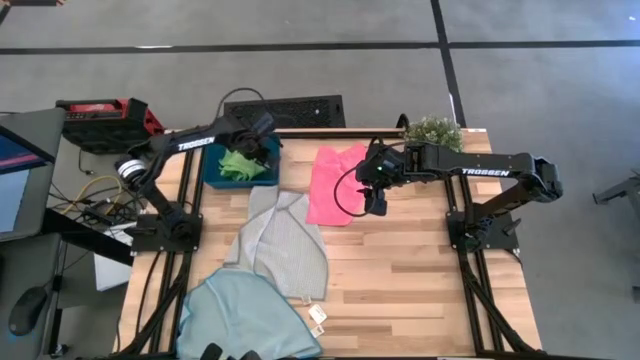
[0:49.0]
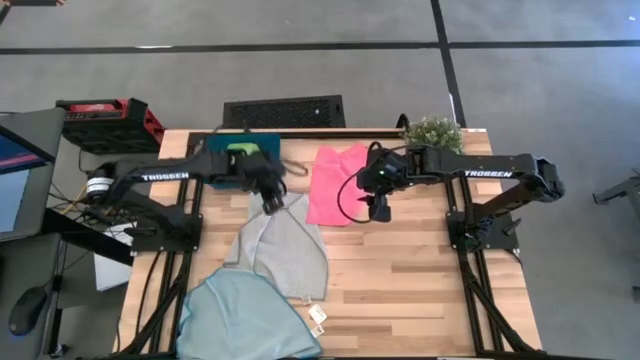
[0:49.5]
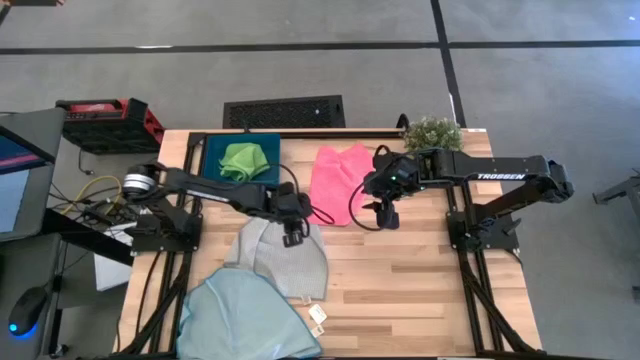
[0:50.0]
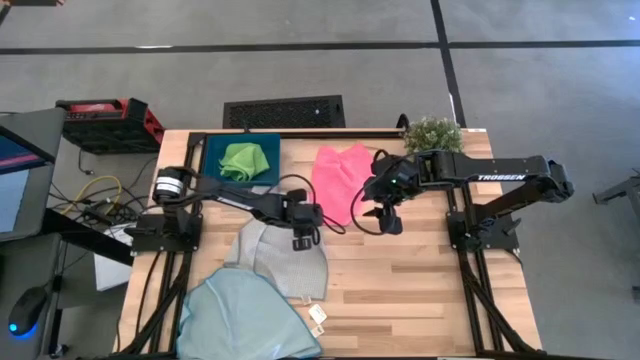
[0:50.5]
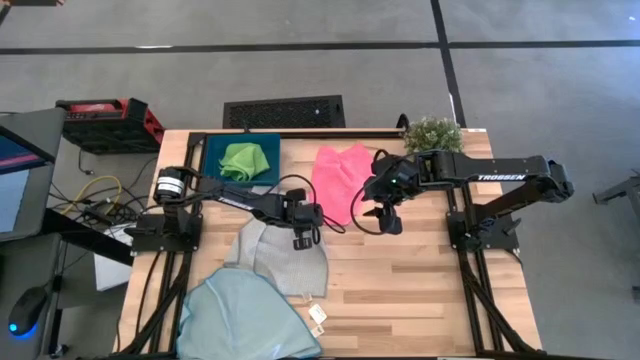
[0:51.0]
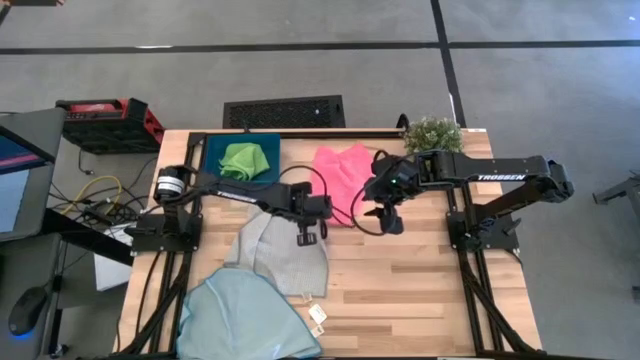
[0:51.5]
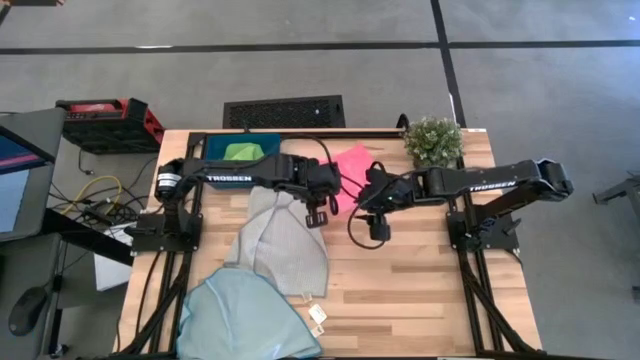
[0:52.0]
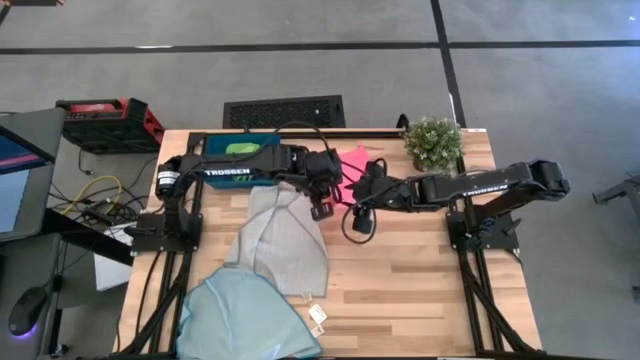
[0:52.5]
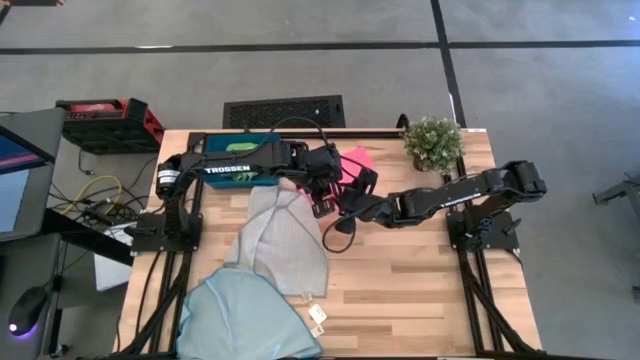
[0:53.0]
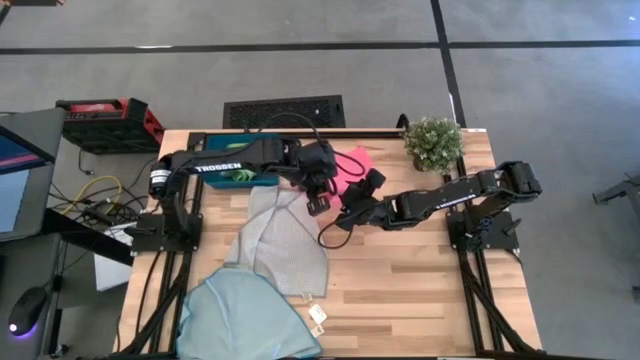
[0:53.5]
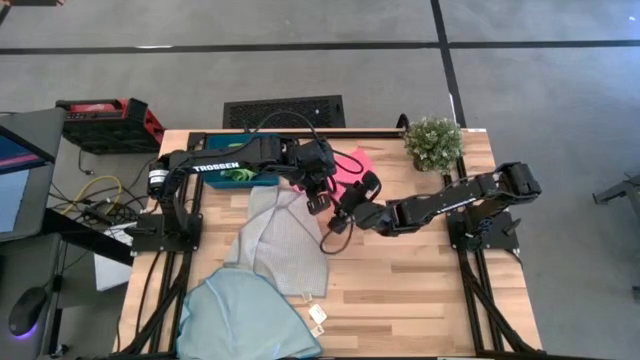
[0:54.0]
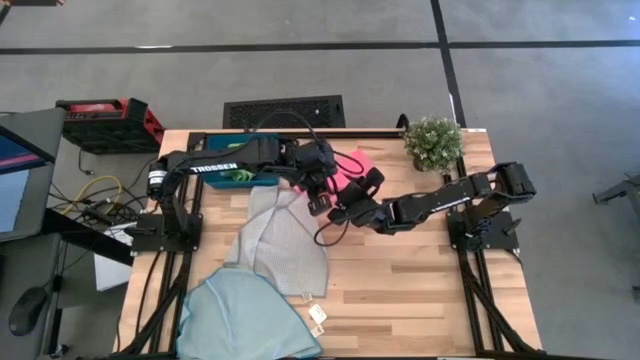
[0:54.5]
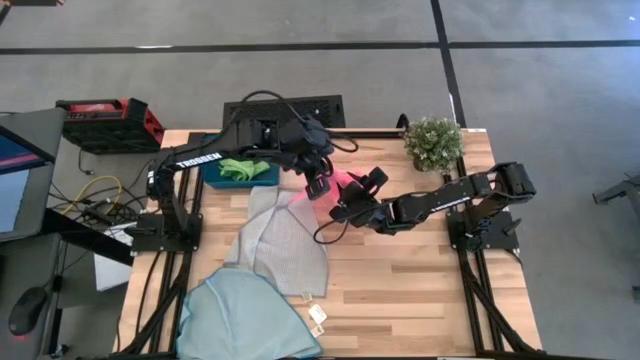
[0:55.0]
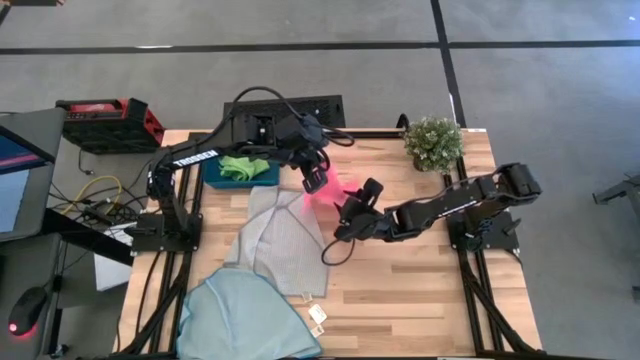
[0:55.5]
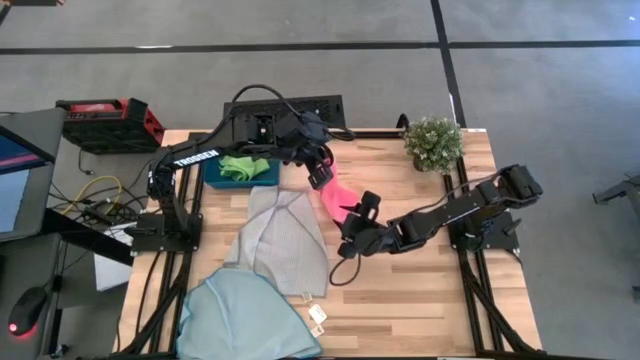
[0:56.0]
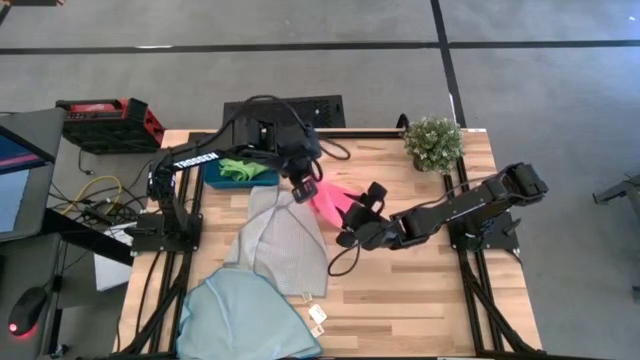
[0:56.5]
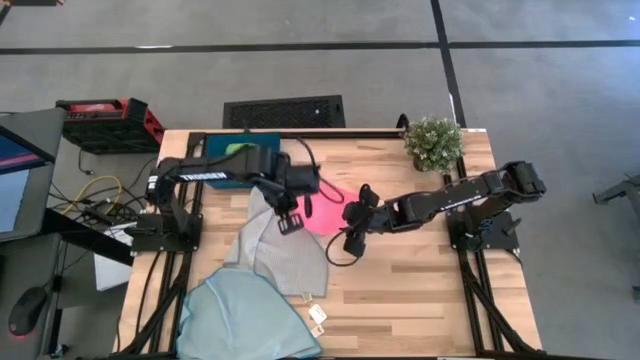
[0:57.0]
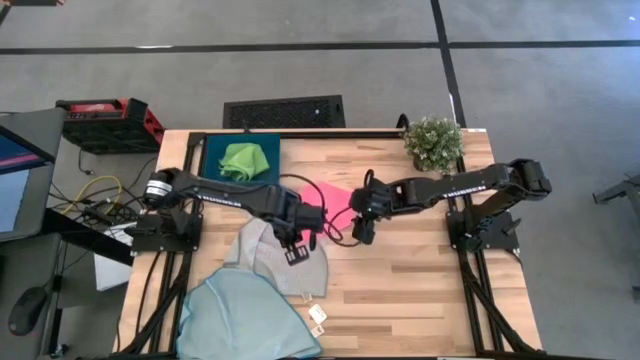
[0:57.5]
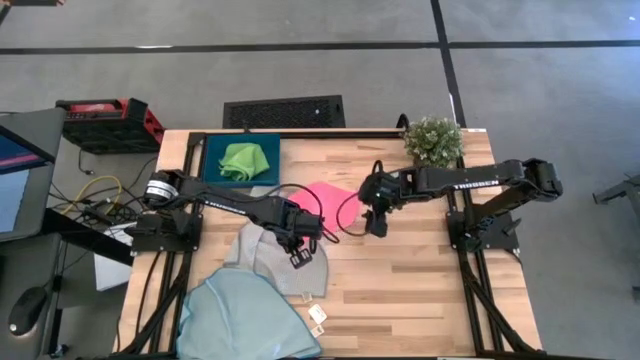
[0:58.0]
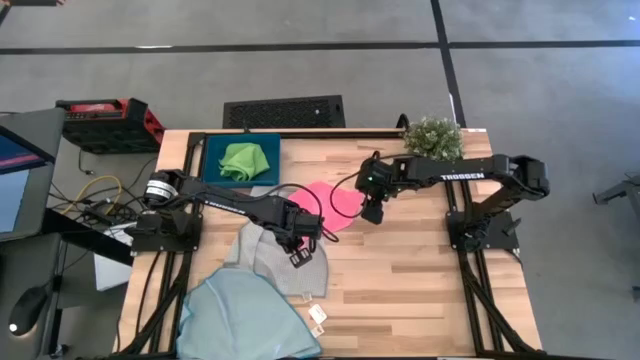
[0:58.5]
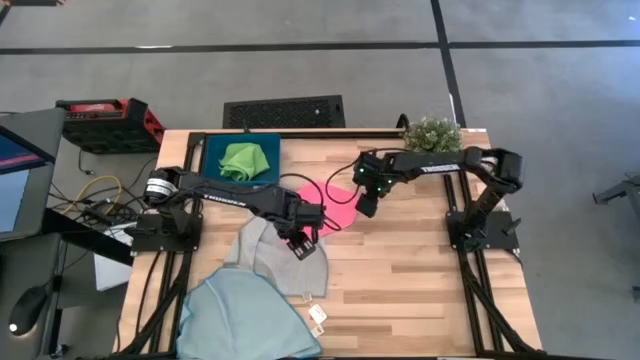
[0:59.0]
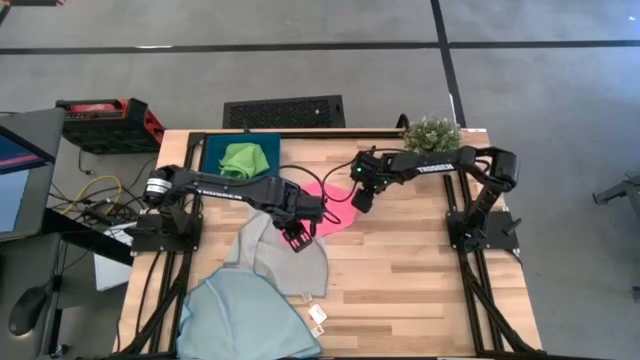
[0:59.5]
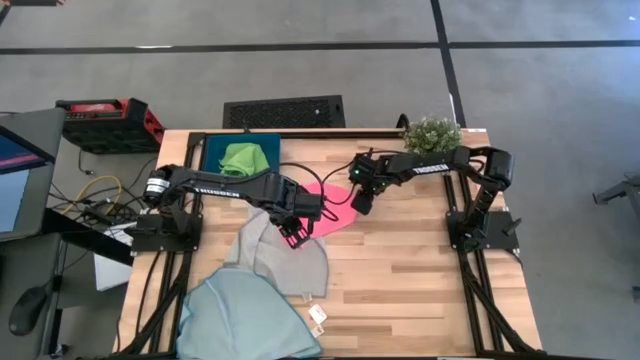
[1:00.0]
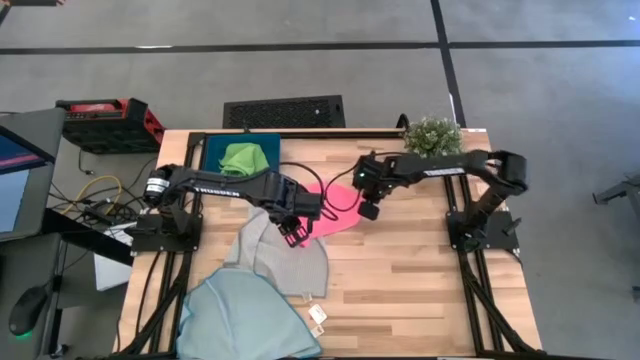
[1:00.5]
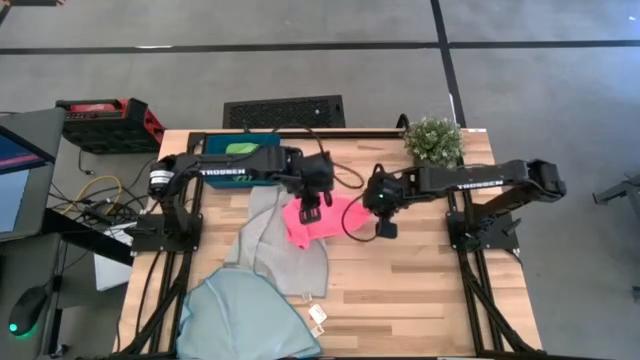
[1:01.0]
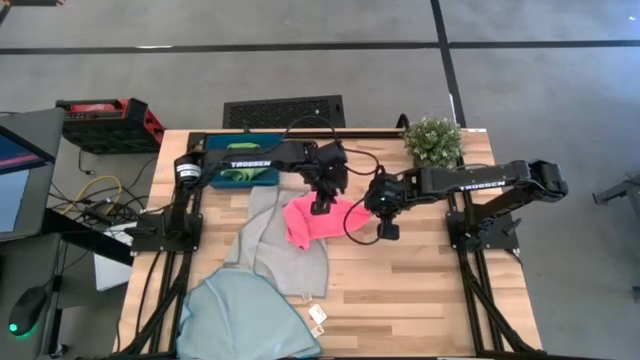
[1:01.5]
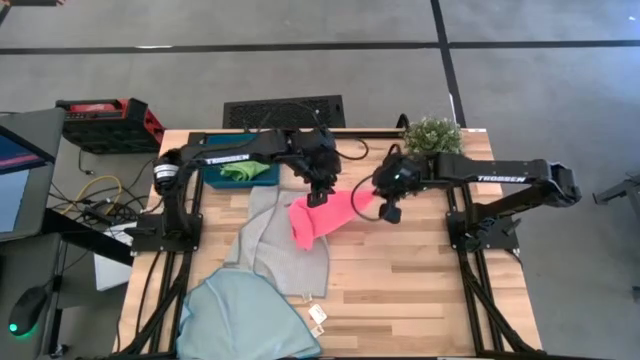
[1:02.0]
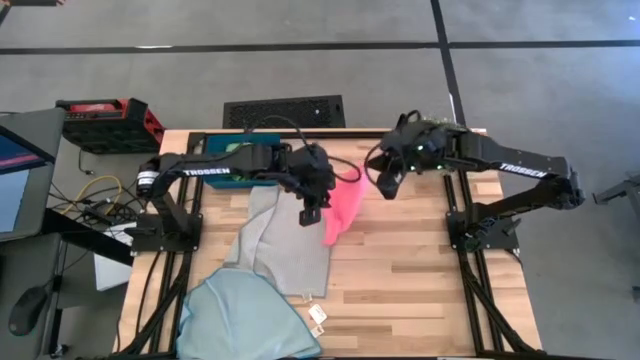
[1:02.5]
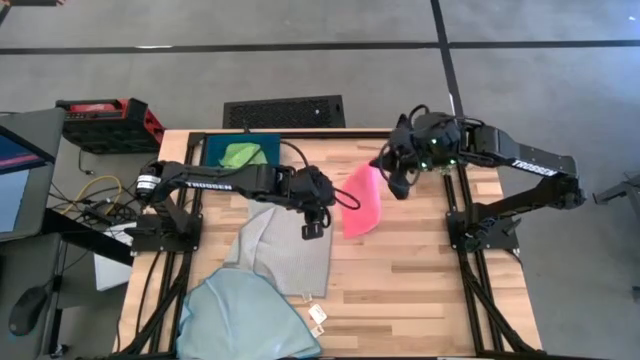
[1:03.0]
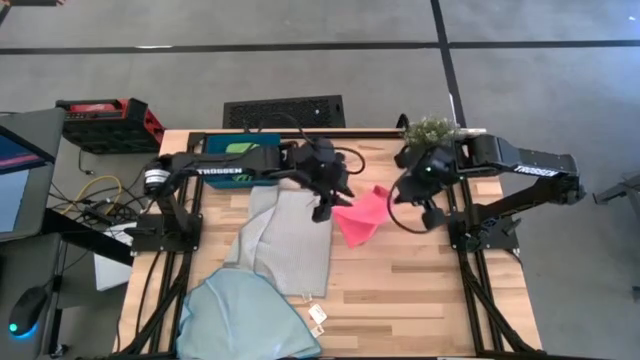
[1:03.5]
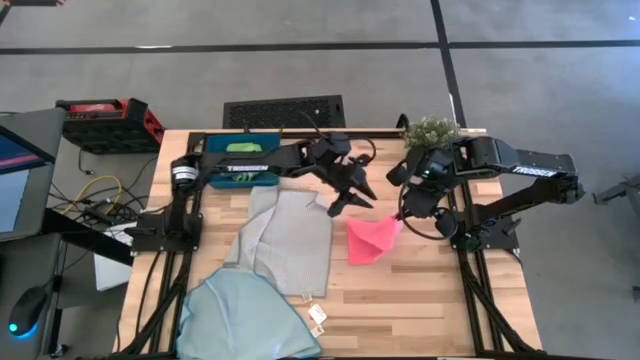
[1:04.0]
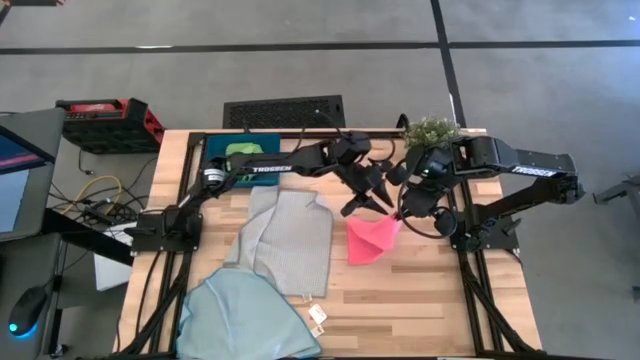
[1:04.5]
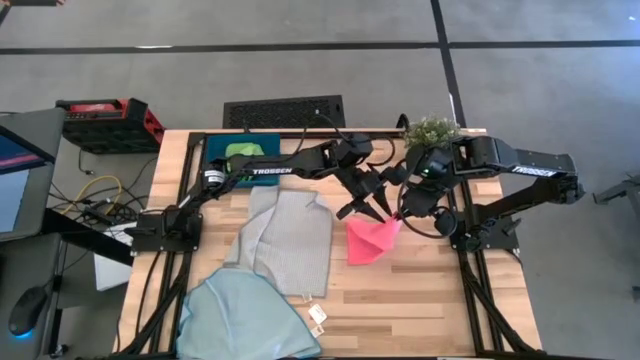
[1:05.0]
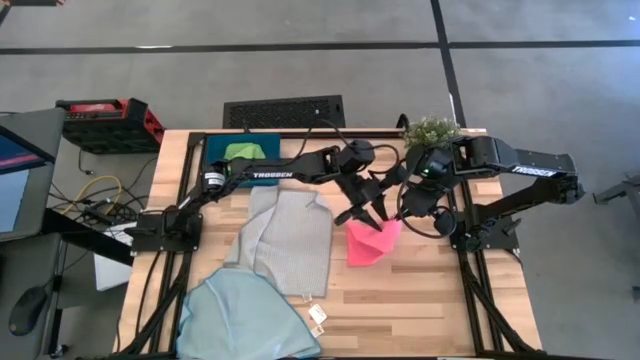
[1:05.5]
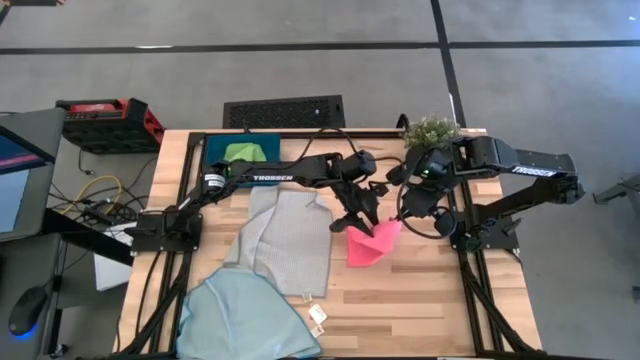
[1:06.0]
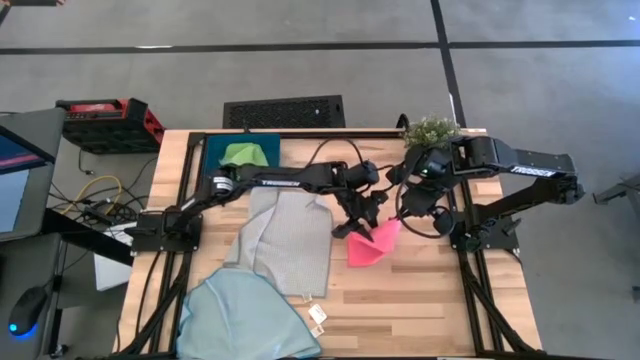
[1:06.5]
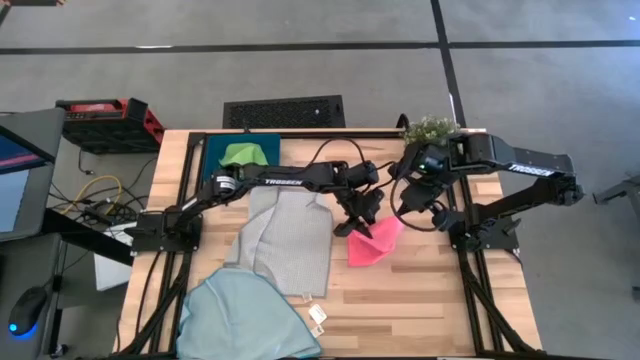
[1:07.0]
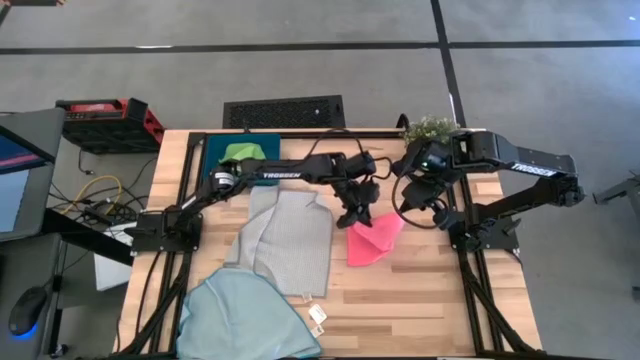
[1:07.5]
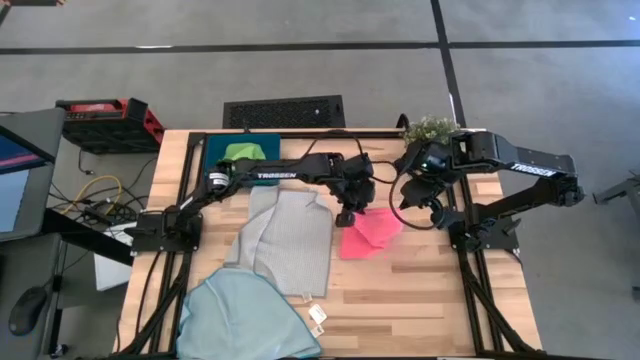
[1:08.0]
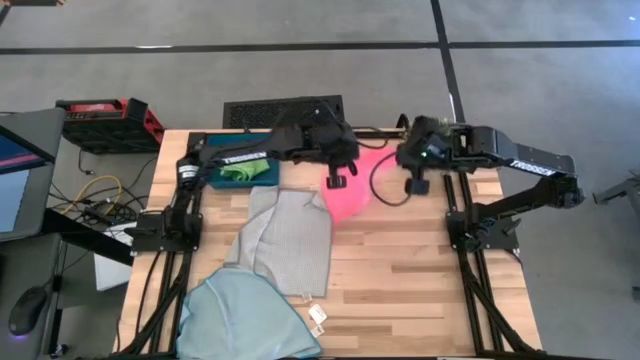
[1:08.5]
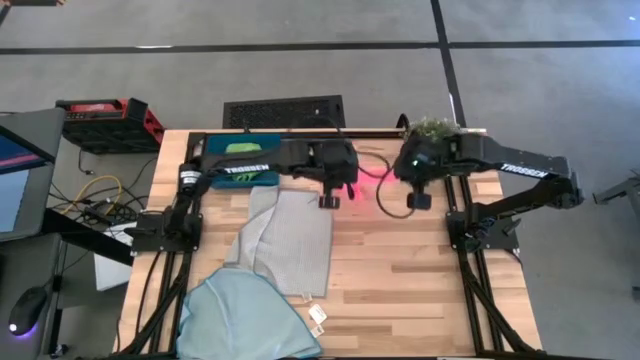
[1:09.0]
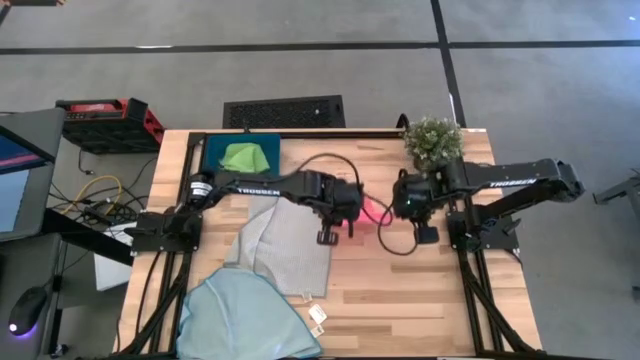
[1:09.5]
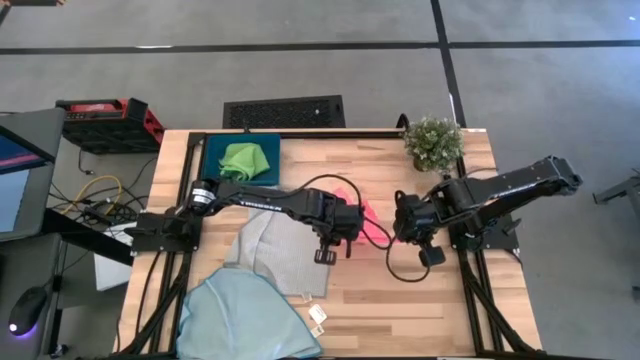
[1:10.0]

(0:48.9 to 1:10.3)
Task: Fold microfiber towels
Fold the pink cloth

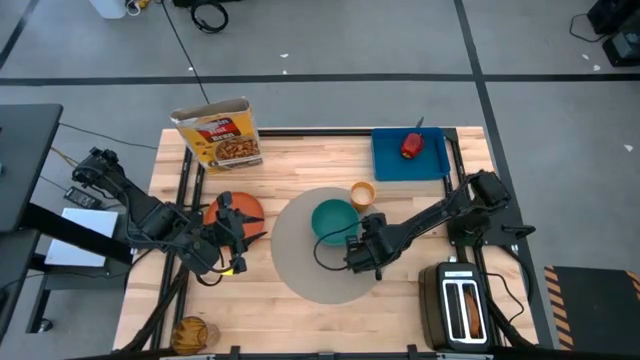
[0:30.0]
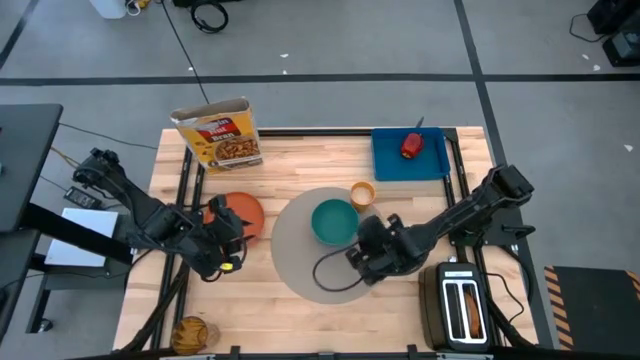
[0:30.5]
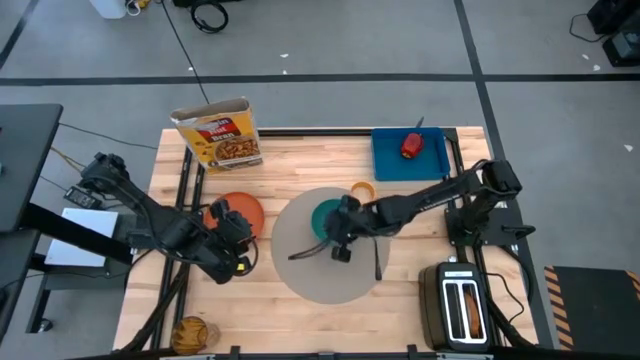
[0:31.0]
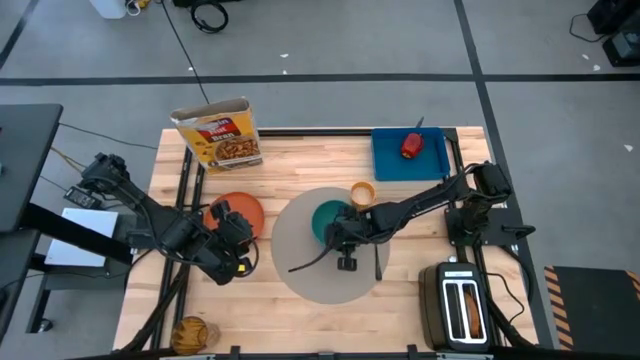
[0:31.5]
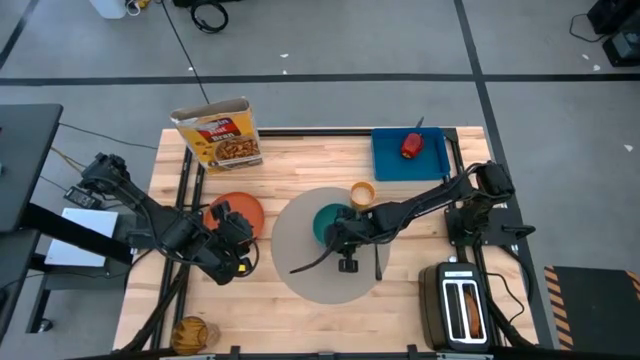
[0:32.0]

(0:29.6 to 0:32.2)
Task: Arrange a breakfast setting
Adjust the bowl on the mat
